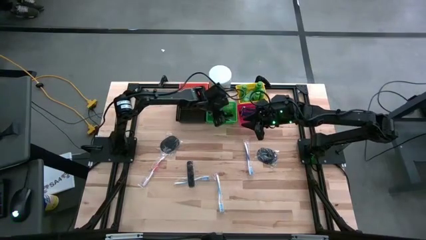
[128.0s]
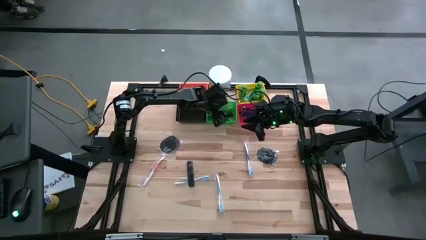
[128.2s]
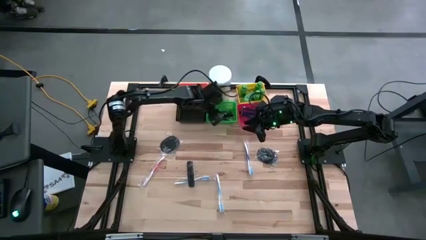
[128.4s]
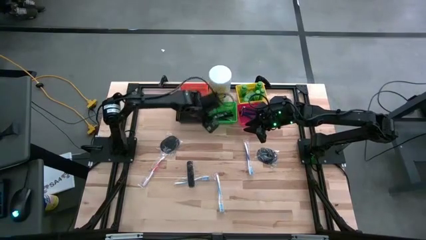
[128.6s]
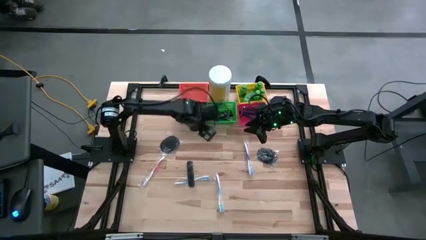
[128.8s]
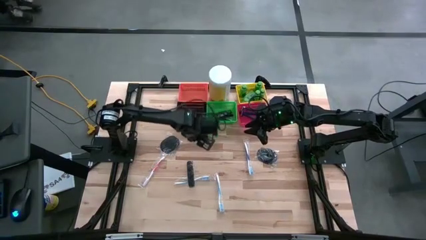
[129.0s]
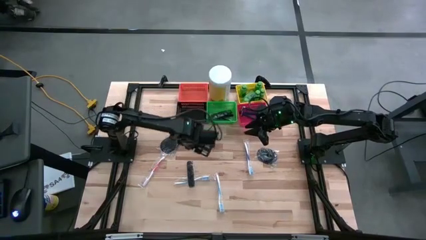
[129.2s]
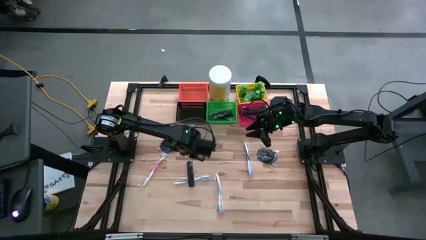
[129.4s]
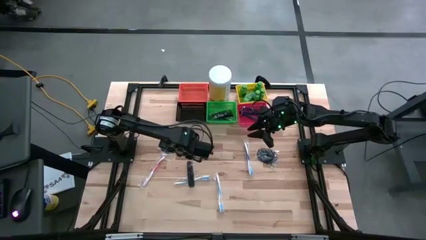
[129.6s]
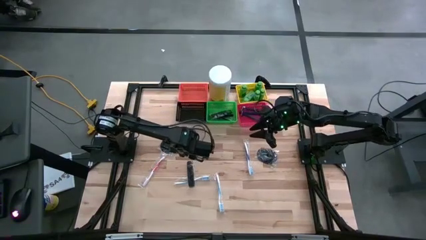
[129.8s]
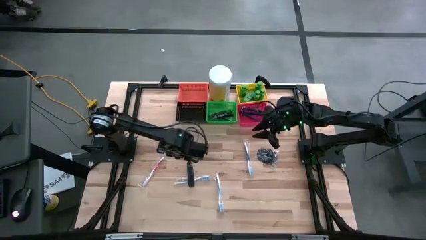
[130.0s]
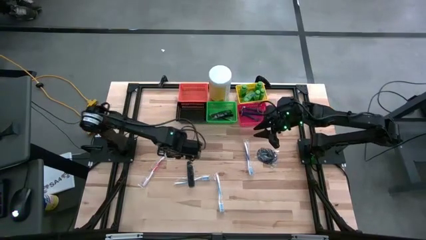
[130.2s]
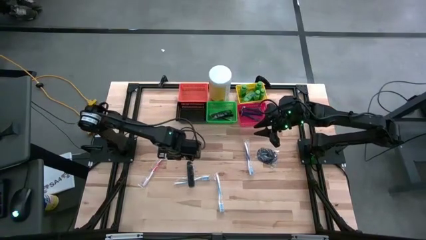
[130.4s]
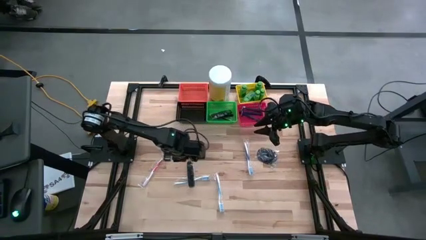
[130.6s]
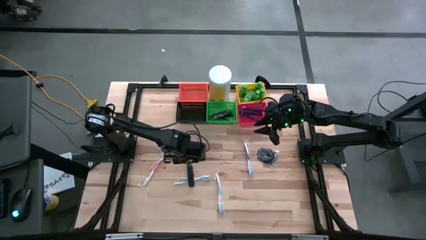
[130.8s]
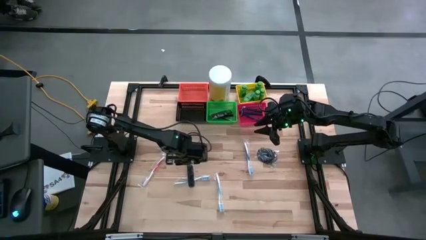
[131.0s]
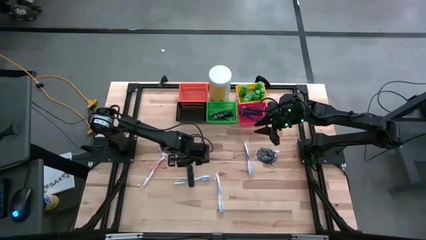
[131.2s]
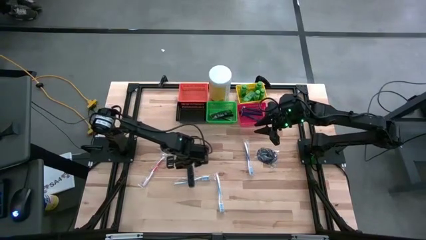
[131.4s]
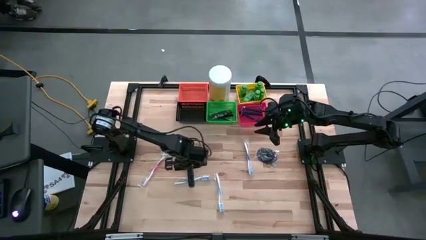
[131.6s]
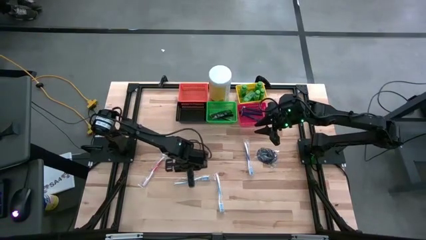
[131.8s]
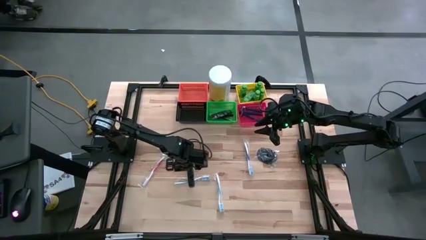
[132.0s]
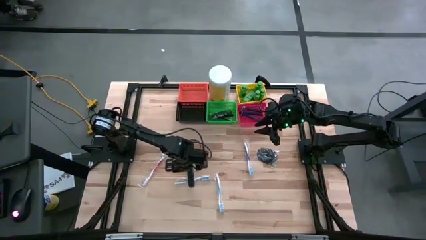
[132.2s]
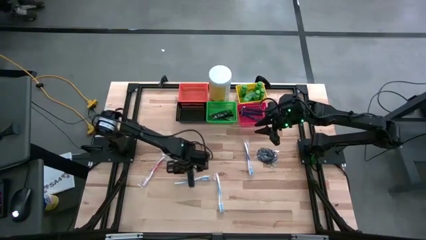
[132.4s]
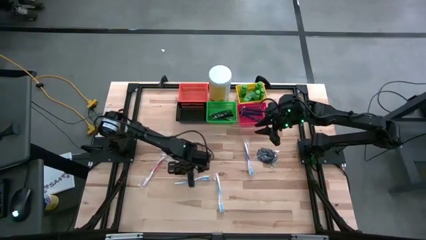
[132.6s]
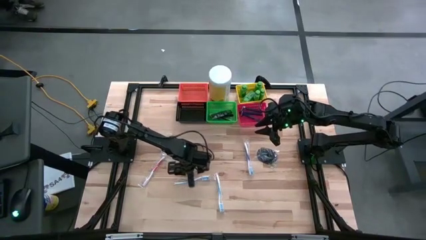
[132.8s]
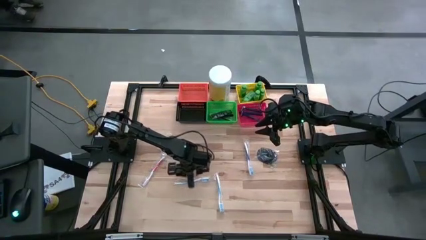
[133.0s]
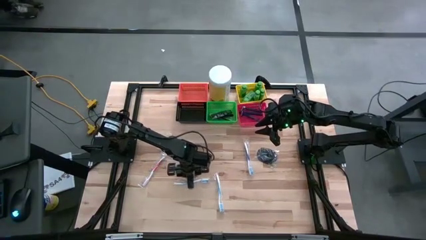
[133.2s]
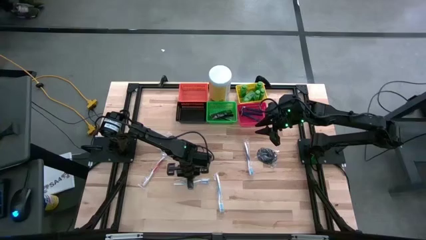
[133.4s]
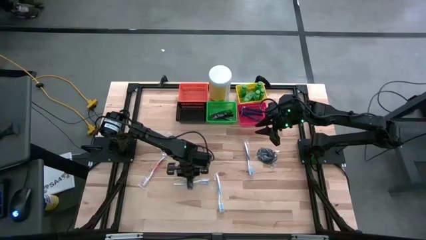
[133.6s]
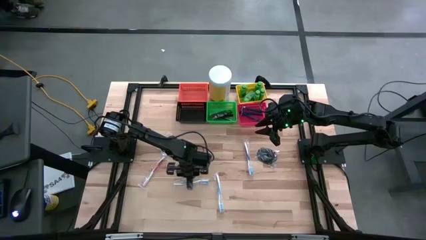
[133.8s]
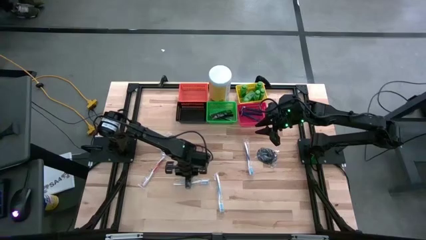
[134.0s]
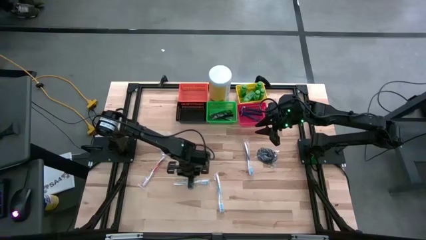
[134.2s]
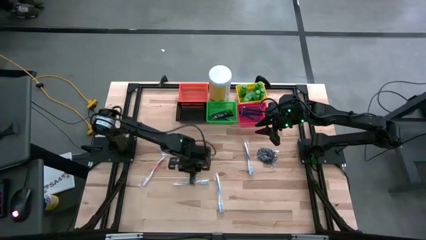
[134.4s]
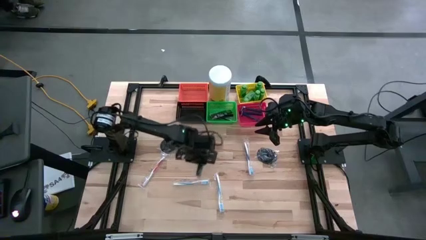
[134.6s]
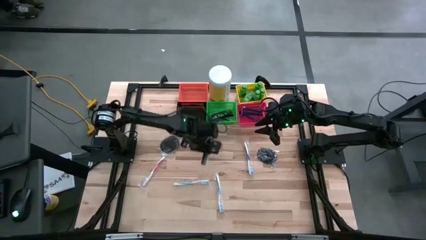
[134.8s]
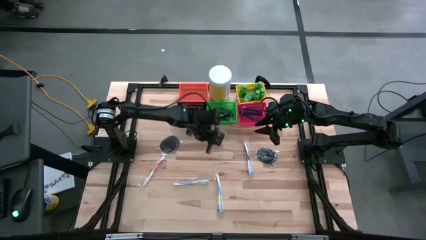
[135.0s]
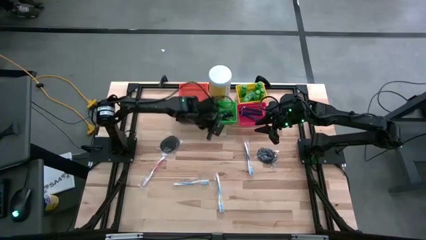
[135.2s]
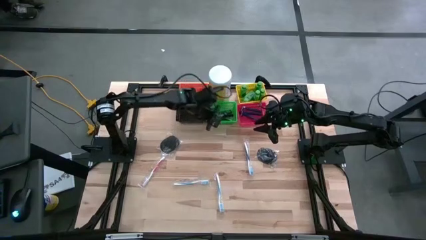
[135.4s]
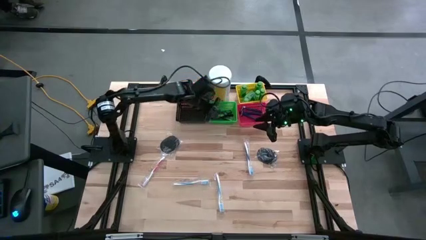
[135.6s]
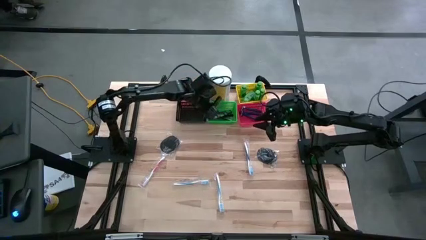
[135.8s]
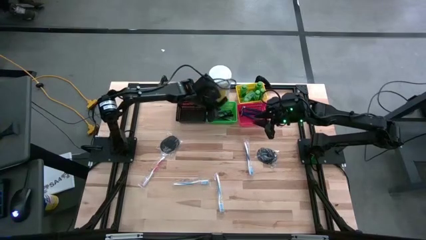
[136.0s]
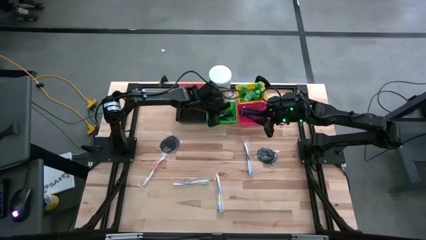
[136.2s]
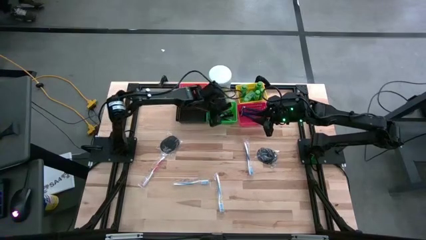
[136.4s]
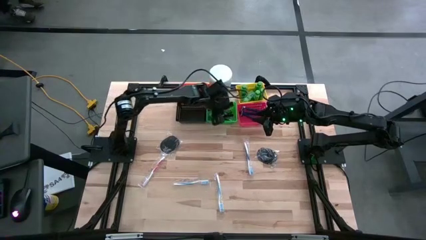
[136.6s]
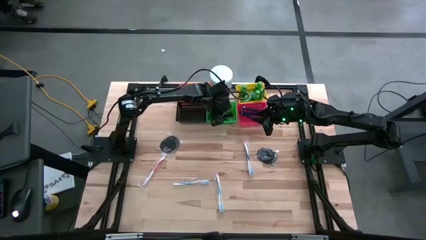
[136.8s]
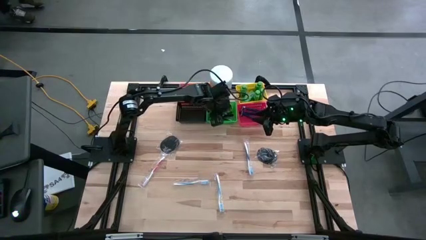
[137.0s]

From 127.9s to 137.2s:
Task: Pick & Place Travel size toiletries
Put the black comb into the green bin

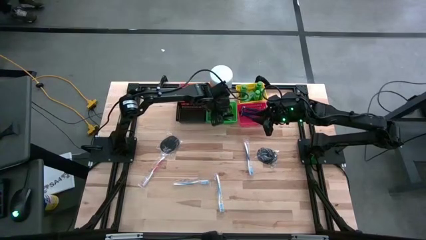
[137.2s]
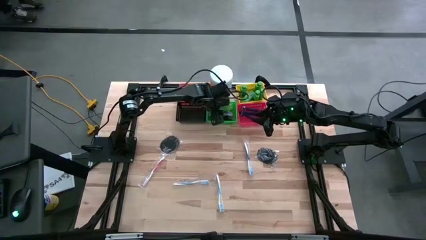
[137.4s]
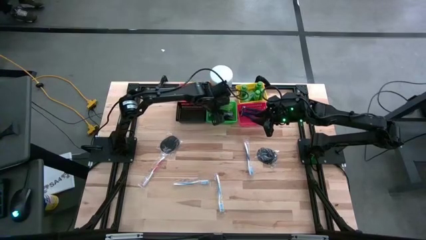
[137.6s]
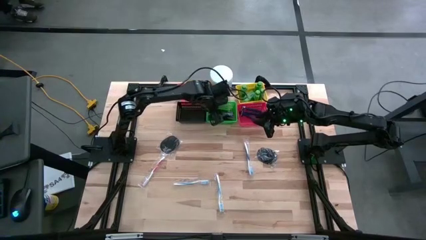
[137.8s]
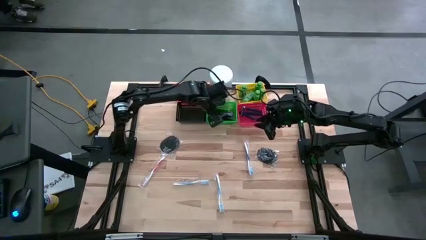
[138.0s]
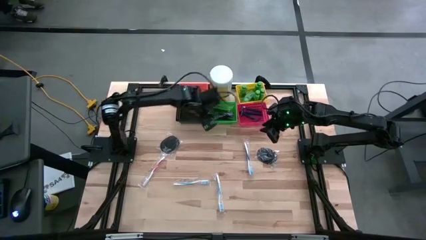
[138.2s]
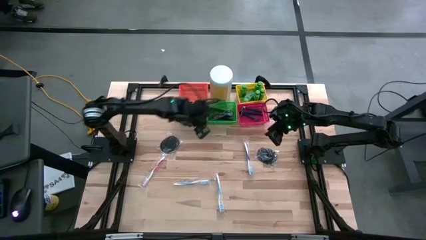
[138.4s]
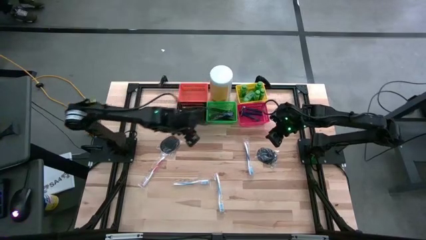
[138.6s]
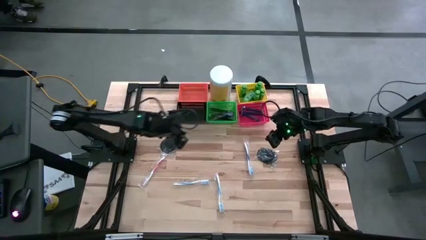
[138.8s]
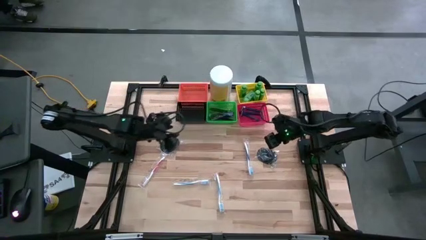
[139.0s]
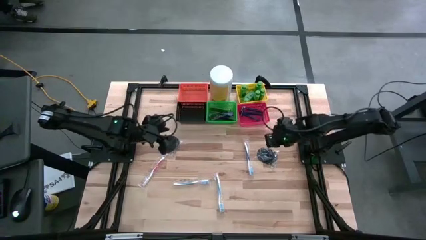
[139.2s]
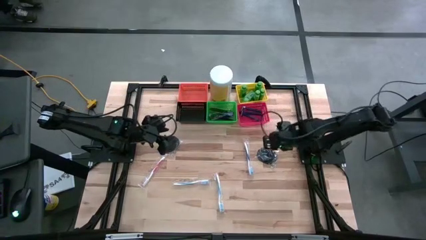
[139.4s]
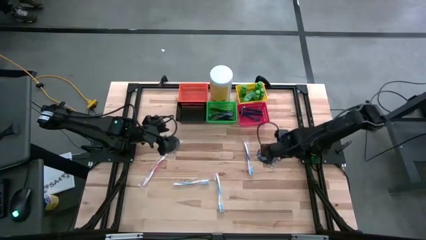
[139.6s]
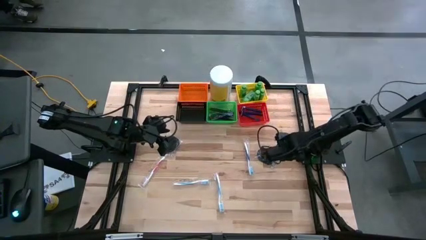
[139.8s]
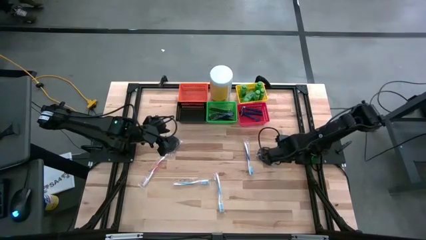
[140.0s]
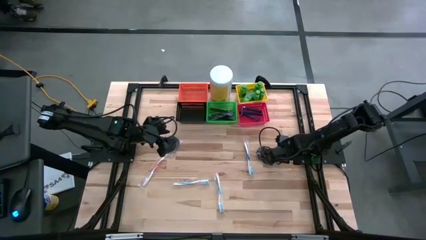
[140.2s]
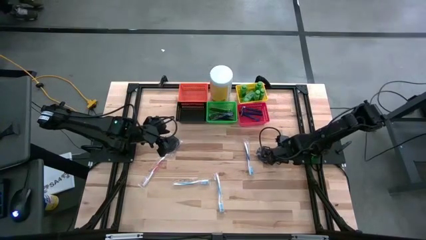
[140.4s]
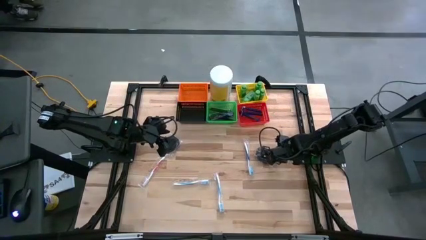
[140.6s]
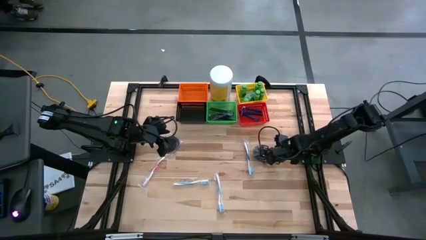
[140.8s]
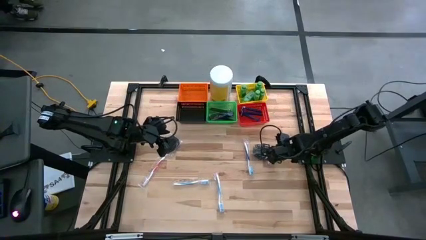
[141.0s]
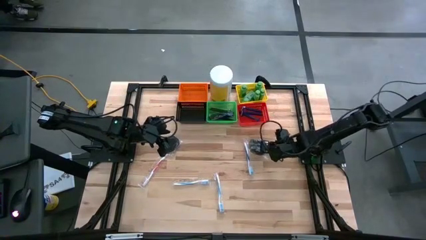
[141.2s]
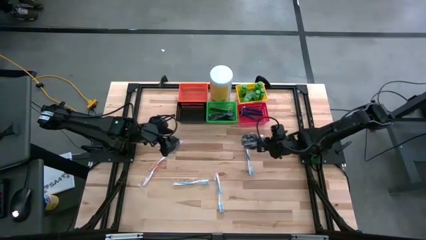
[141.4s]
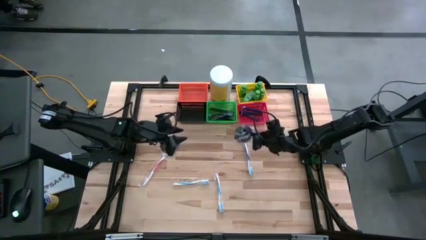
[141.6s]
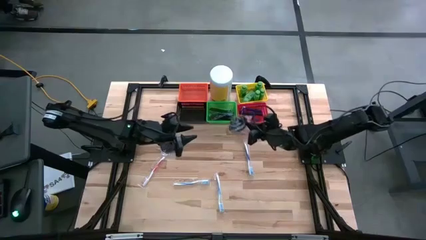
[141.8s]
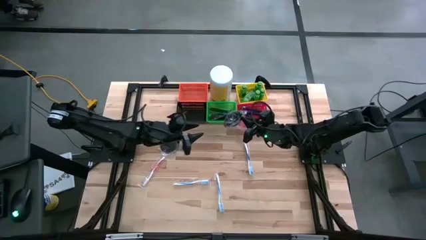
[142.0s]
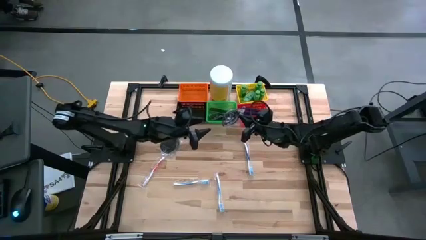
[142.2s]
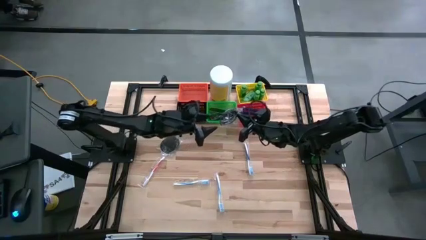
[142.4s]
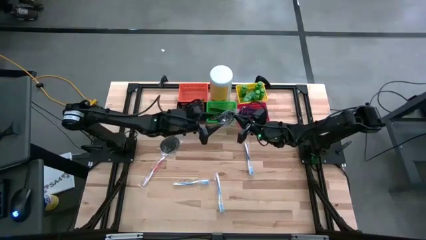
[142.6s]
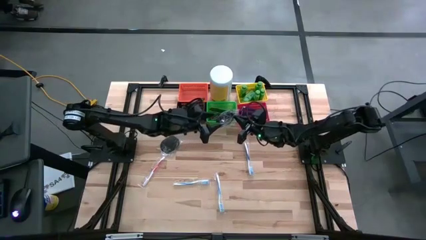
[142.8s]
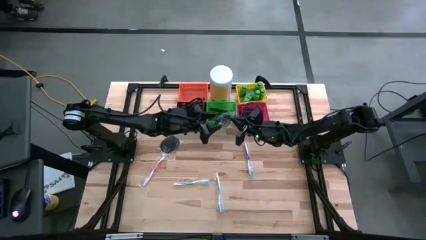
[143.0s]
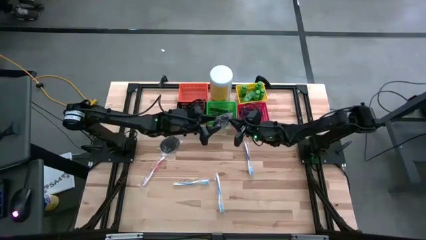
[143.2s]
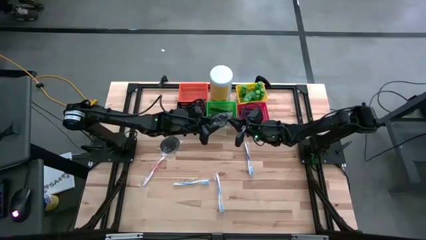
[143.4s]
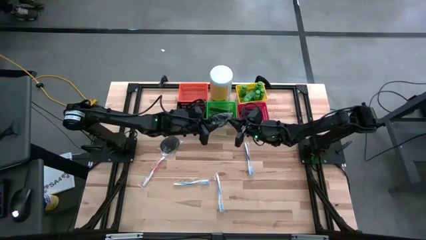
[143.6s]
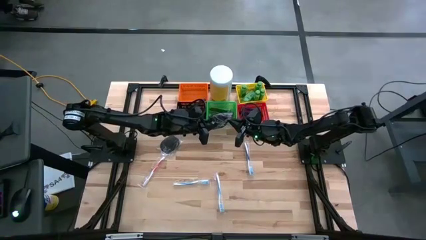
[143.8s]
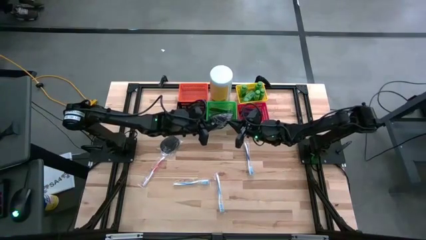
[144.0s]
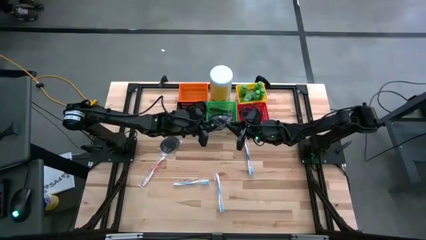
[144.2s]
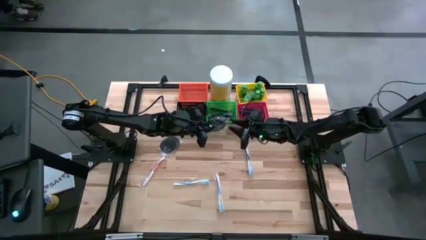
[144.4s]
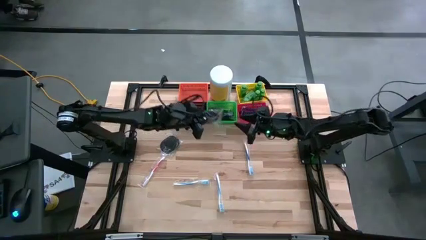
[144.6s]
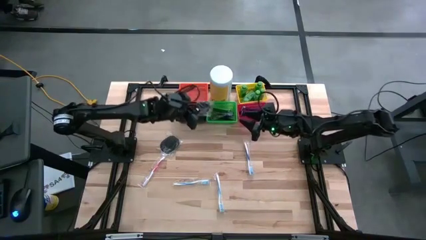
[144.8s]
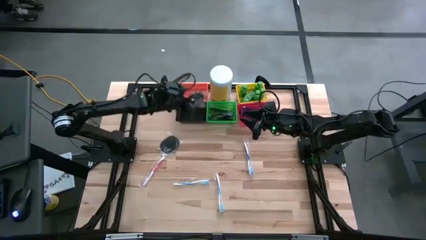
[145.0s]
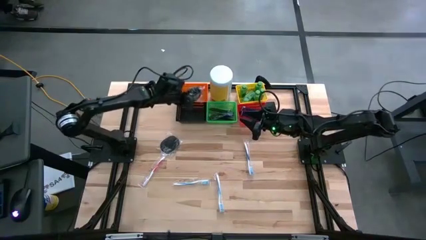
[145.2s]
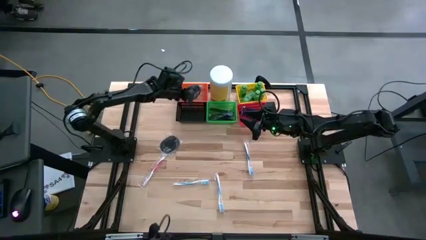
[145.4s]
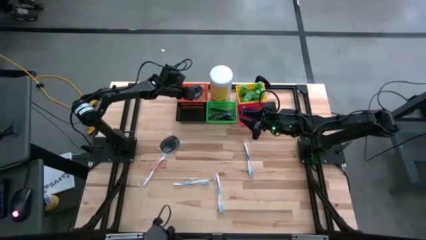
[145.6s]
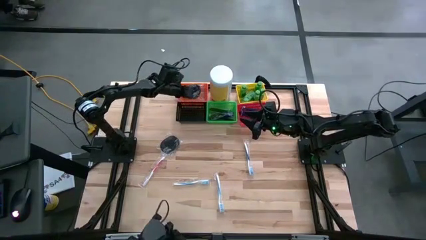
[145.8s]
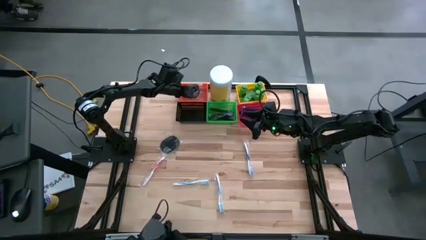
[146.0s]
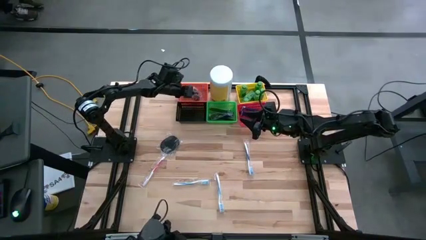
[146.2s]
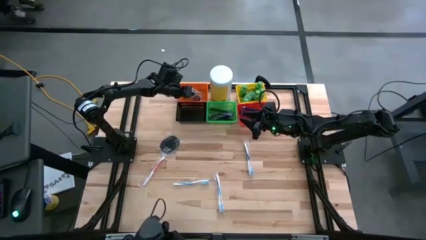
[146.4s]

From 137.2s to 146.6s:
Put the black hairbrush into the orange bin
